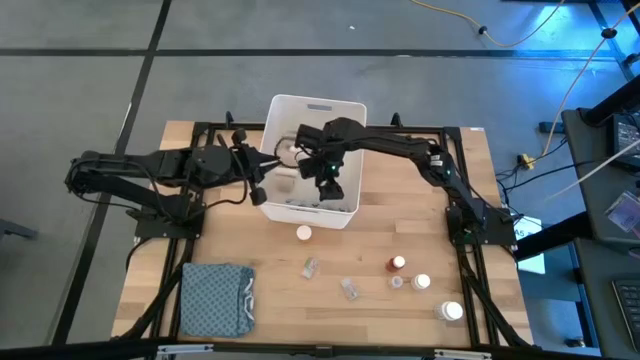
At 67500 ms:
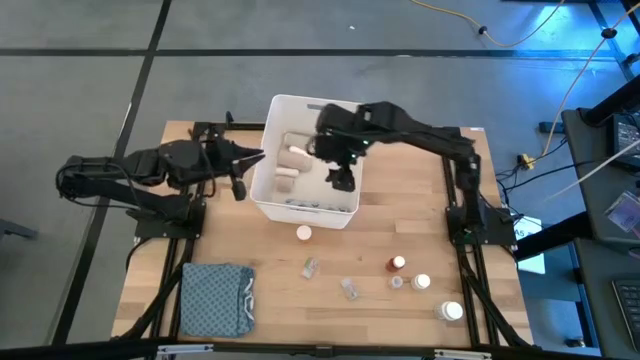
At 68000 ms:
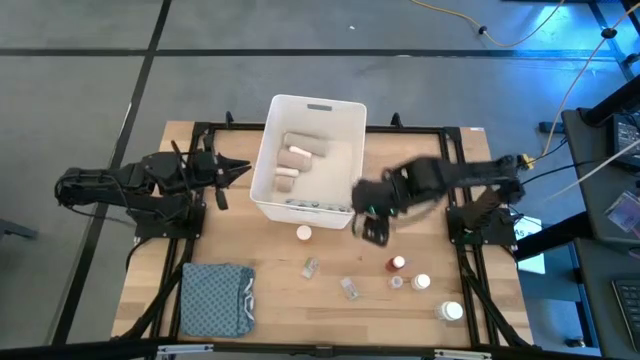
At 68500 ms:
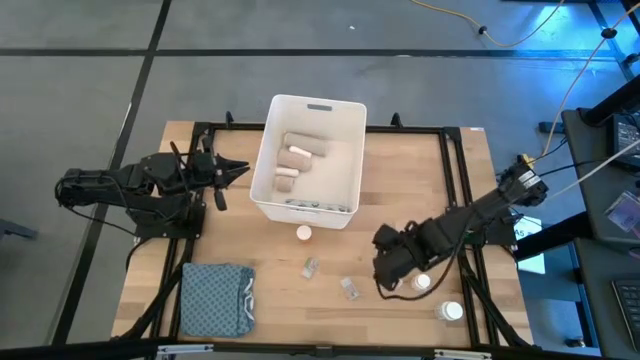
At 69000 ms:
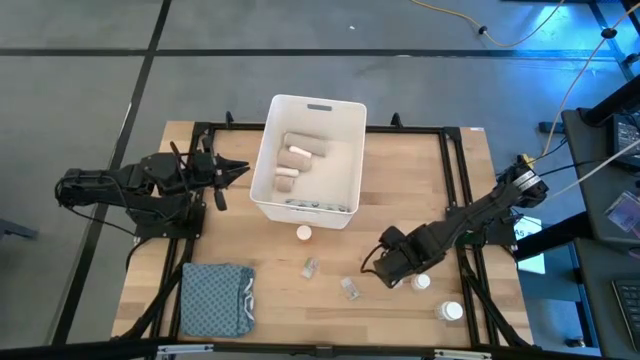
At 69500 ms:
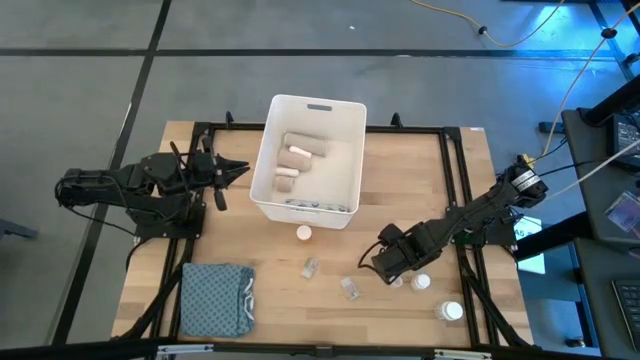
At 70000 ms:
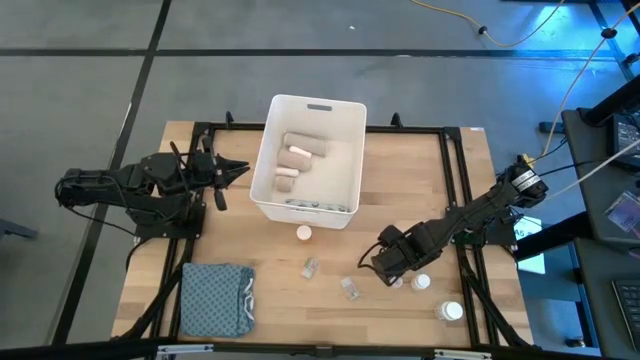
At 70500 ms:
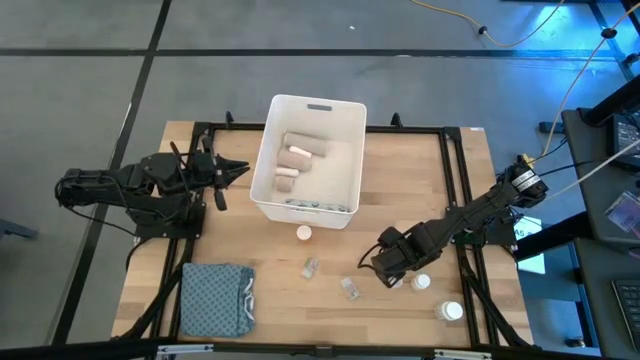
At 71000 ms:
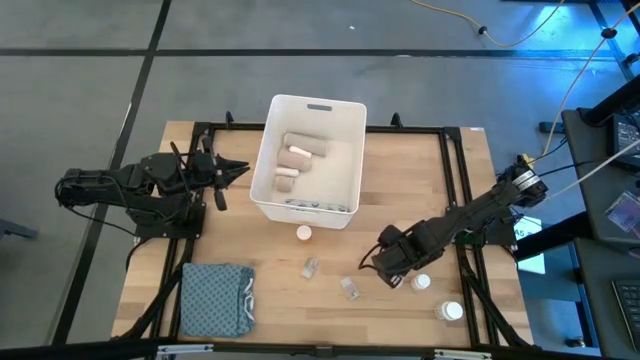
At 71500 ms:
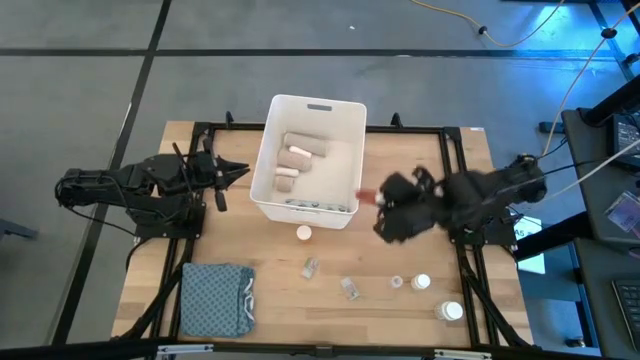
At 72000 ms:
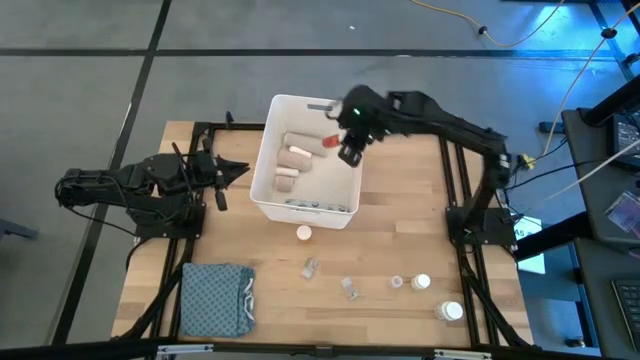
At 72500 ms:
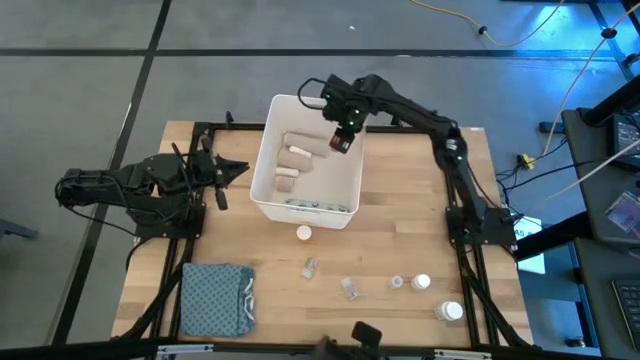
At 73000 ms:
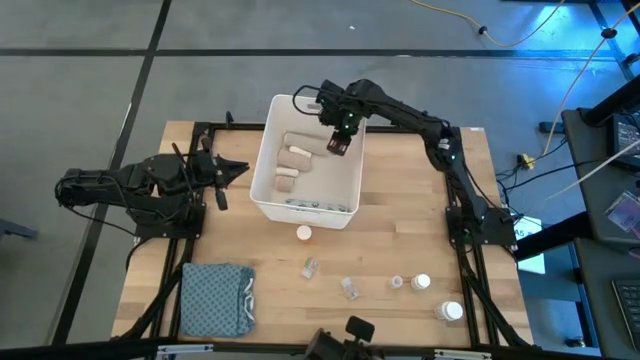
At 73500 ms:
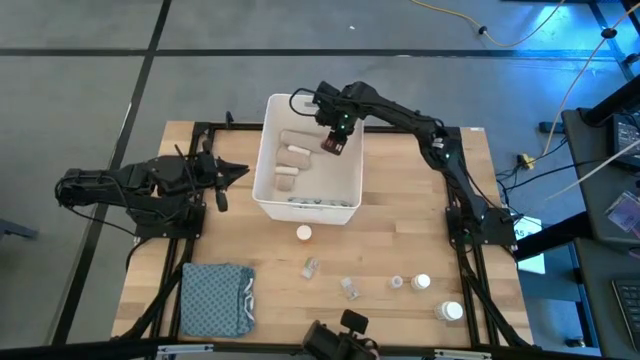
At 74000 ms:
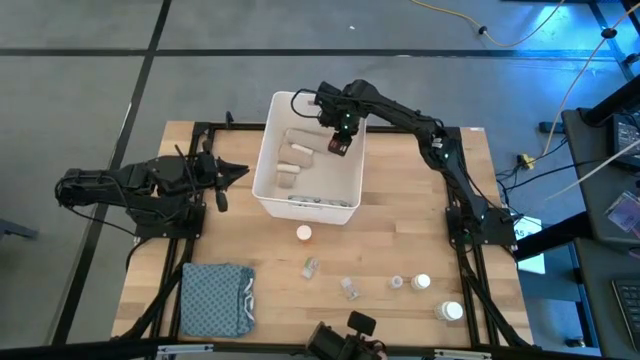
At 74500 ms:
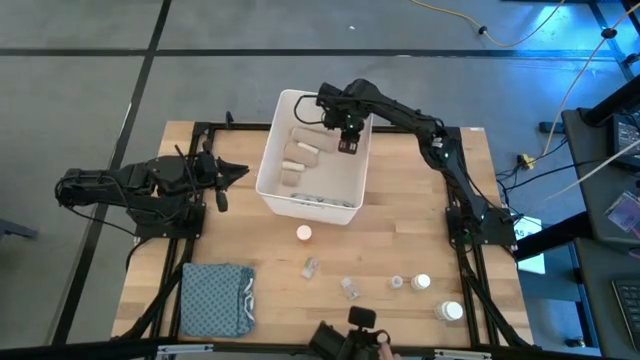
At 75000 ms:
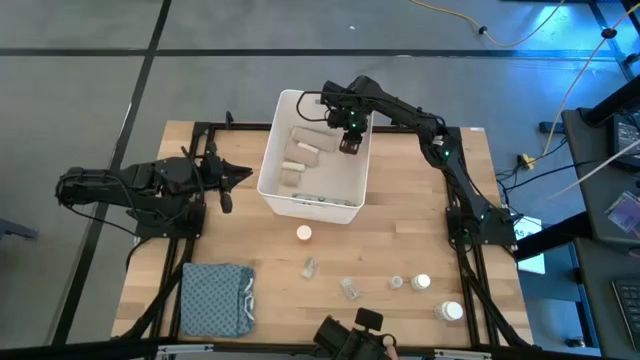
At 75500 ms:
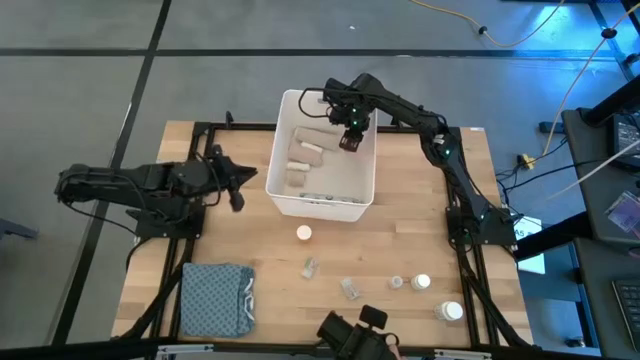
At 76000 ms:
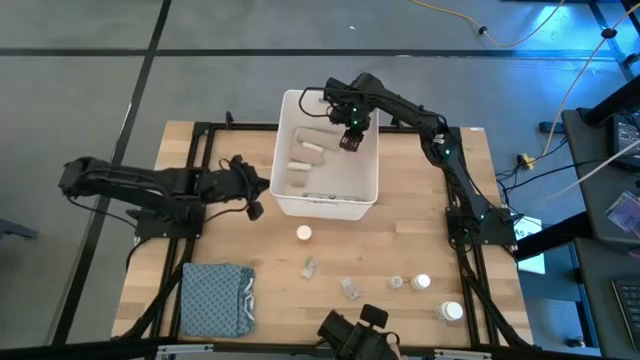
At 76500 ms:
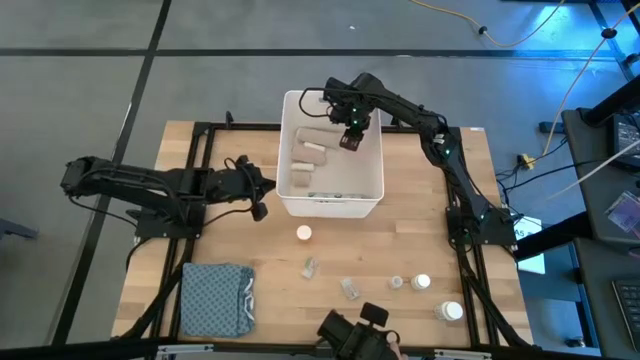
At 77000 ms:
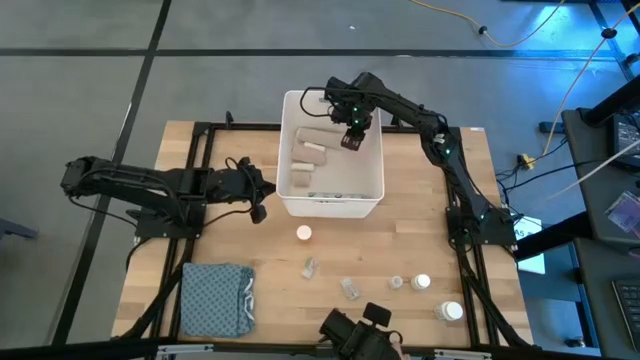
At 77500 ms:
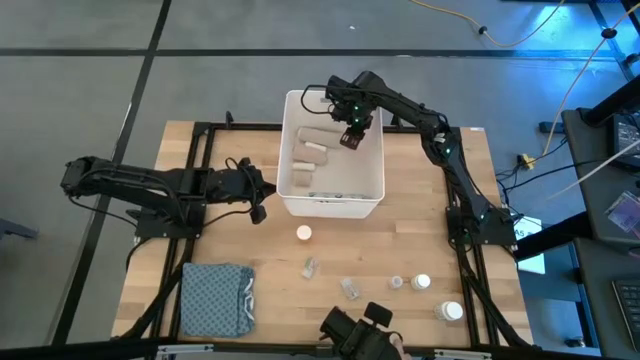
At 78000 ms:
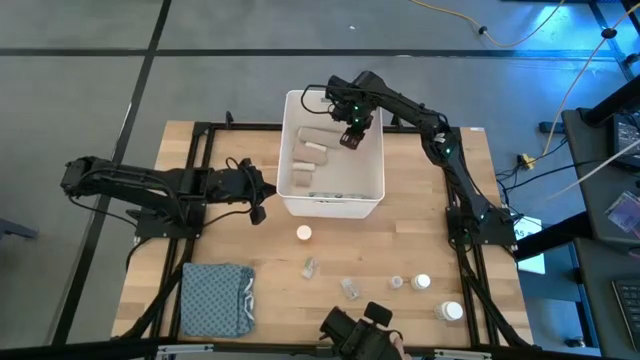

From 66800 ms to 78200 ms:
Task: Pick & place medical supplies in basket/bin
Put the red pill bottle into the white bin

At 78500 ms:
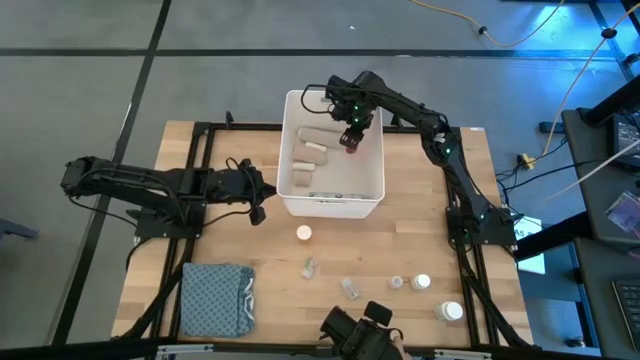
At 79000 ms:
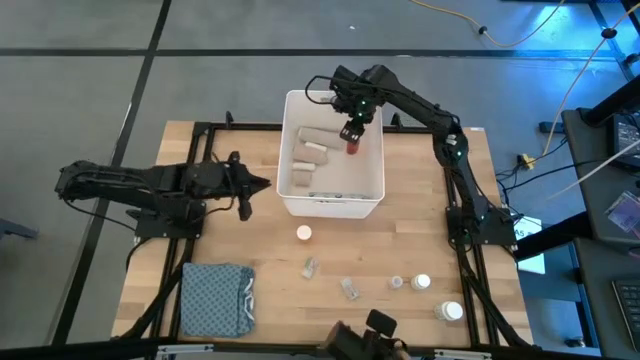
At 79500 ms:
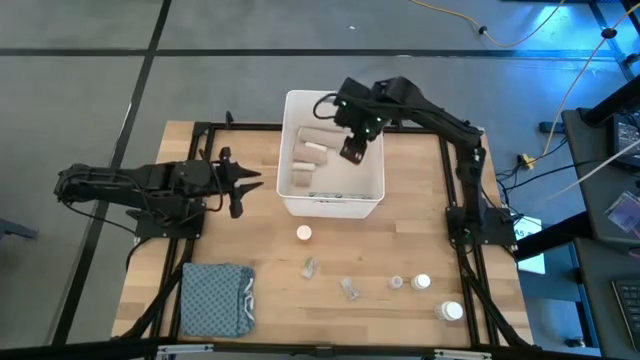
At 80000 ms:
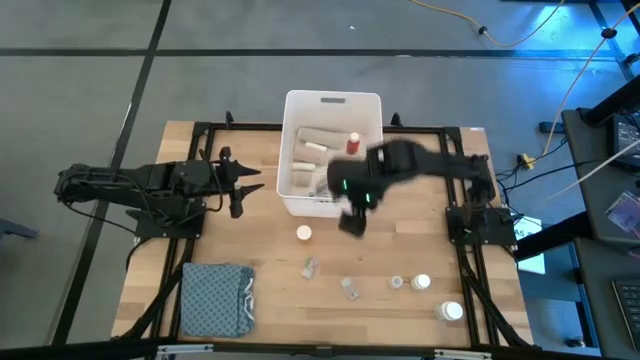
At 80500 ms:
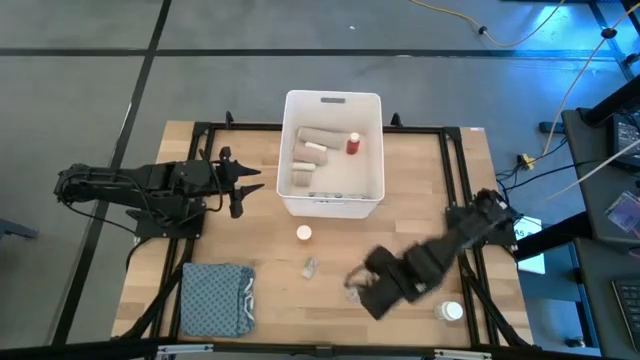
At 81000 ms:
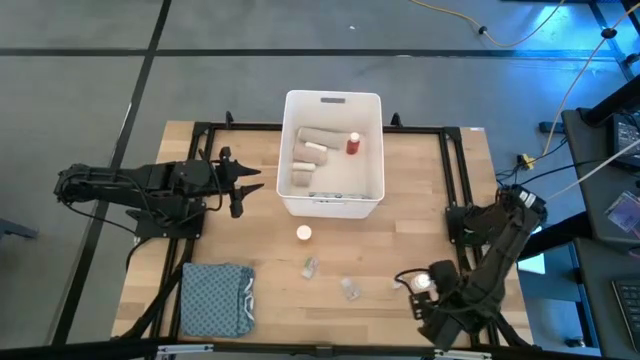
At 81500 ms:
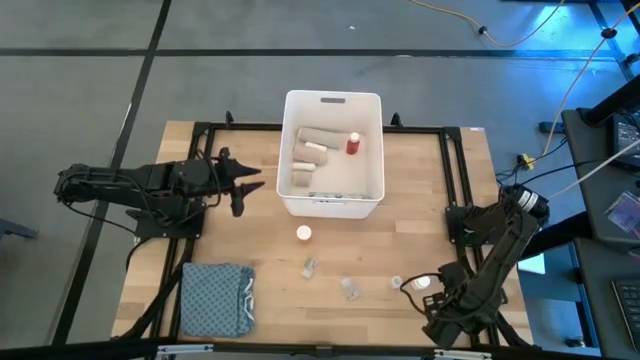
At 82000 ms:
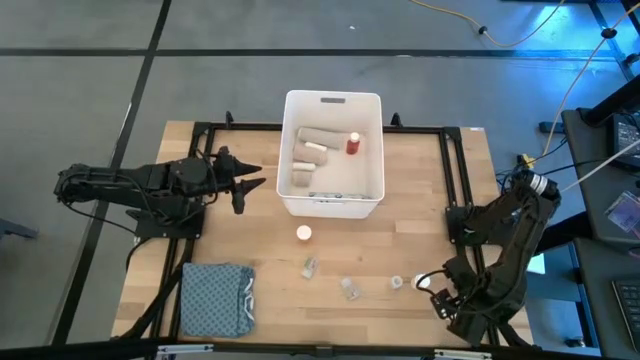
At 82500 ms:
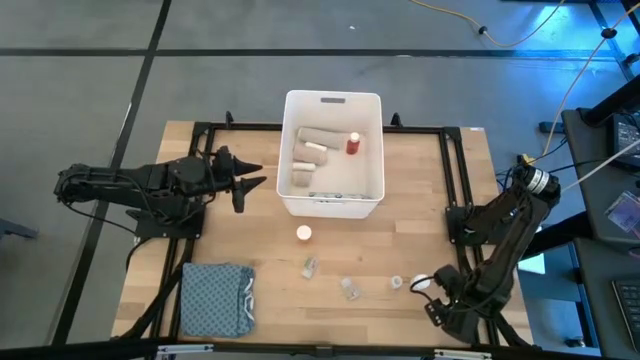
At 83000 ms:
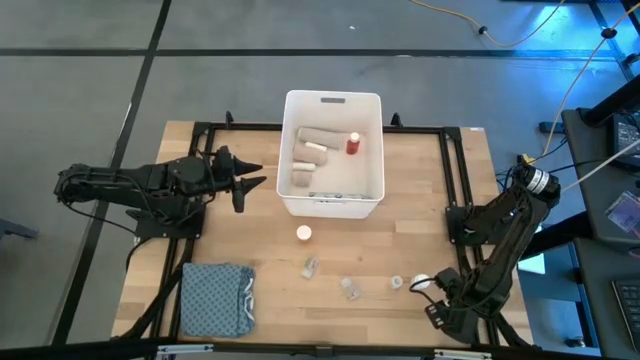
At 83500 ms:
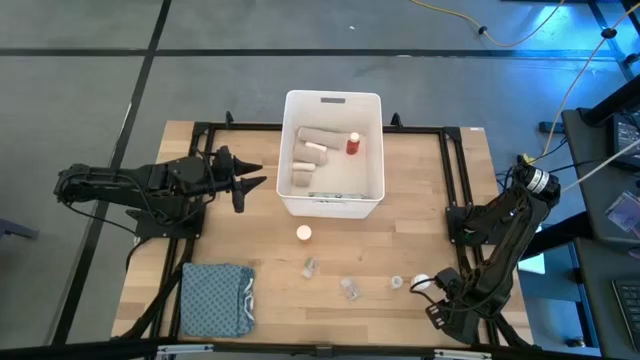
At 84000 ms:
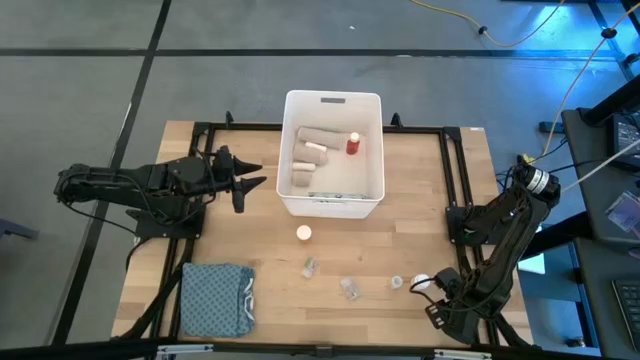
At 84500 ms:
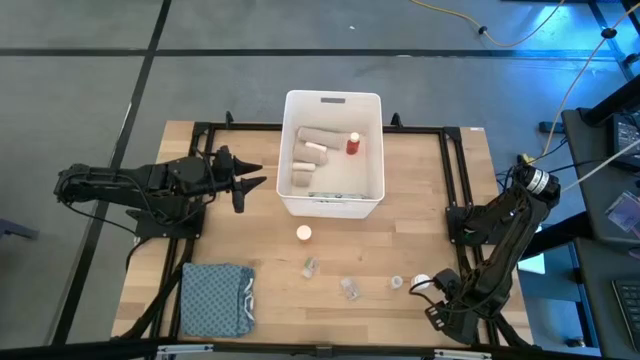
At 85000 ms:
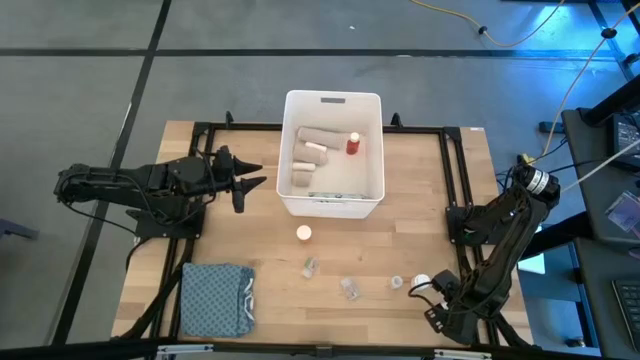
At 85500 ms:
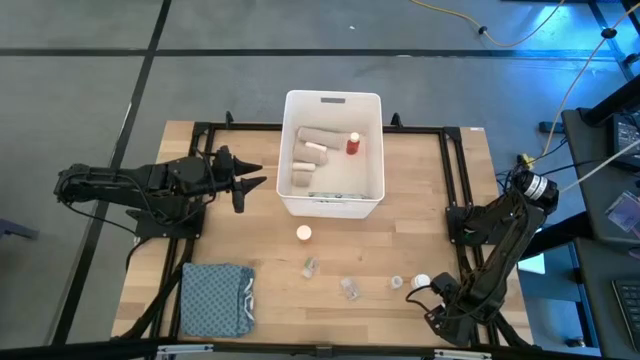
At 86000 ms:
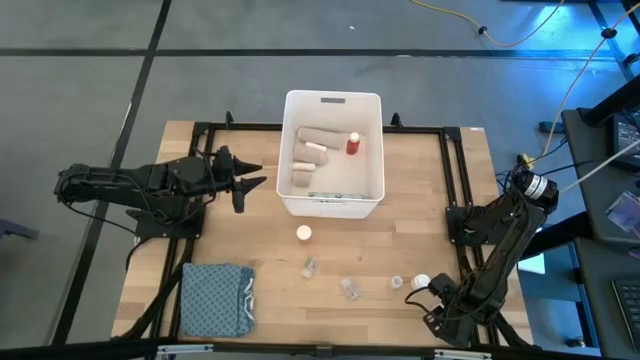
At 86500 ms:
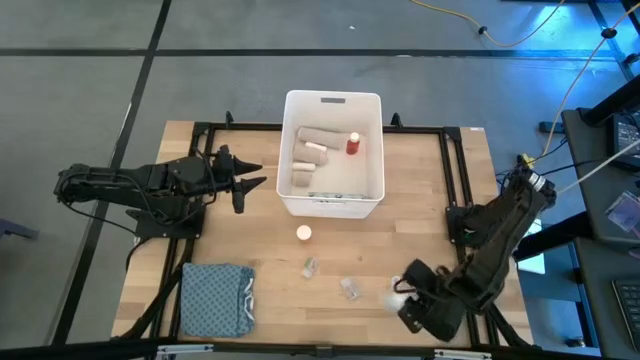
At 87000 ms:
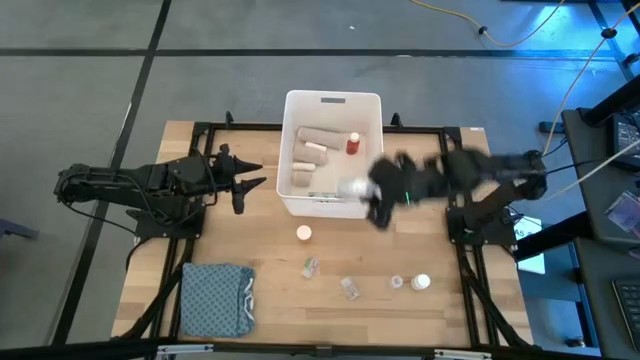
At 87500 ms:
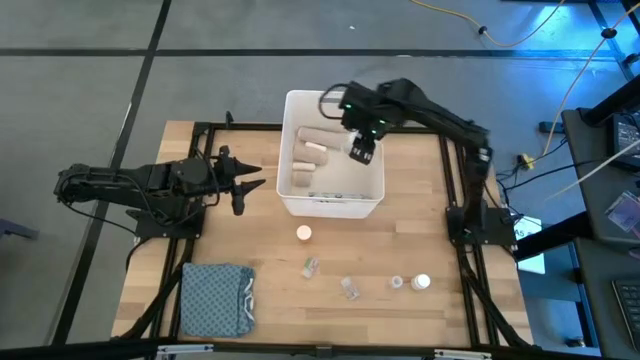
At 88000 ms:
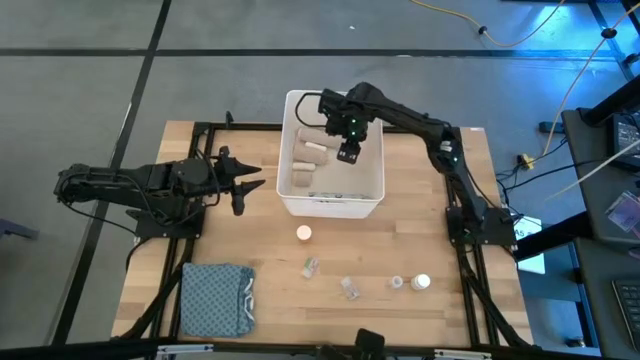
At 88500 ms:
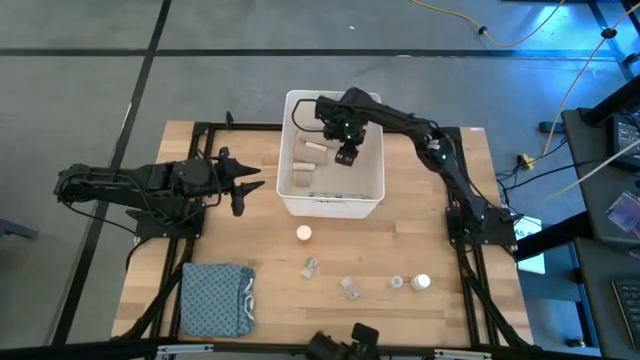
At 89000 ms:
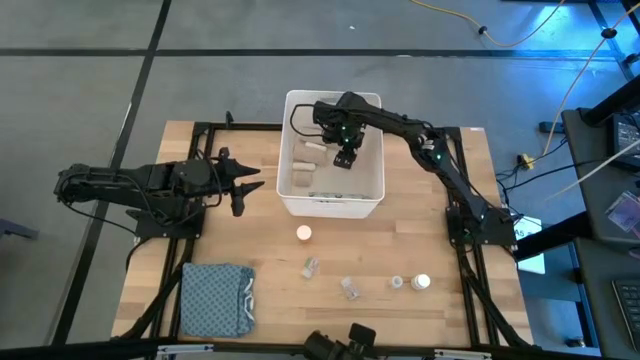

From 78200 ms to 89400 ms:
Put the large white pill bottle into the white bin
